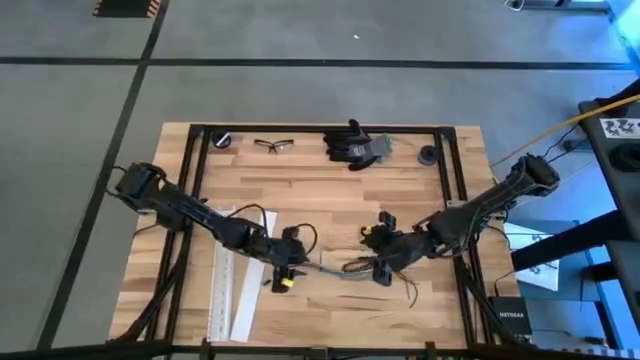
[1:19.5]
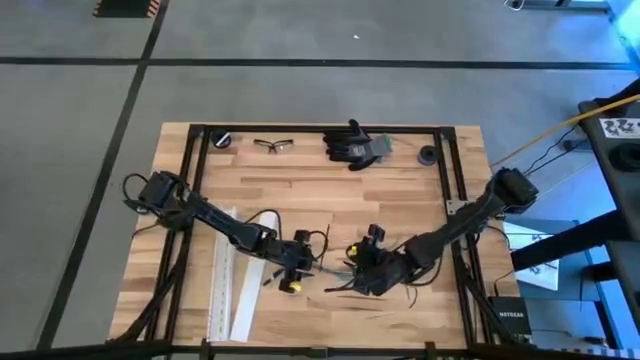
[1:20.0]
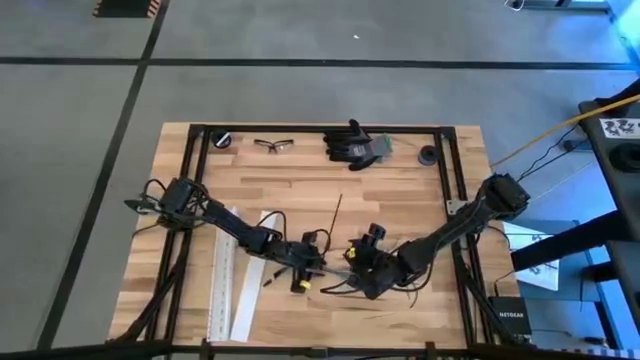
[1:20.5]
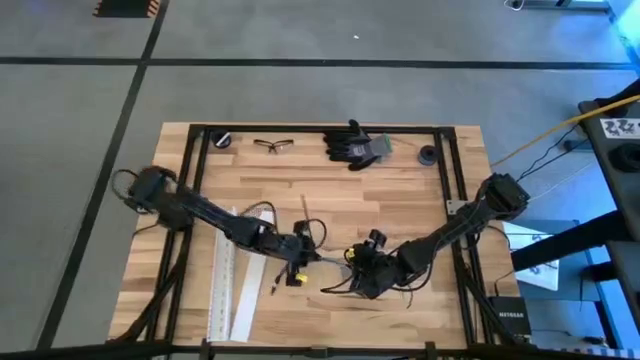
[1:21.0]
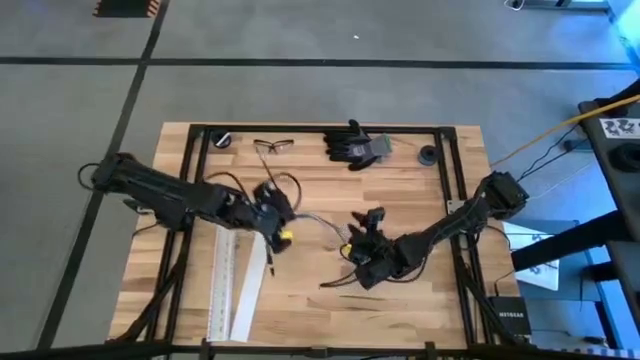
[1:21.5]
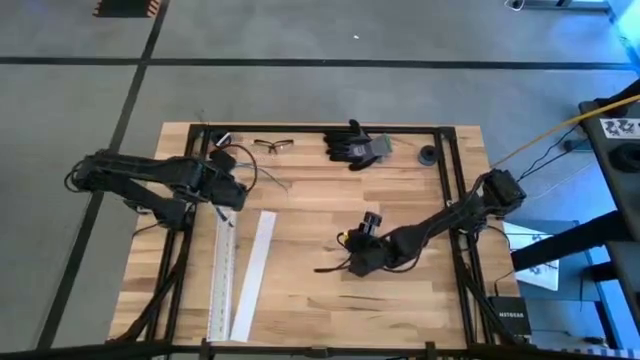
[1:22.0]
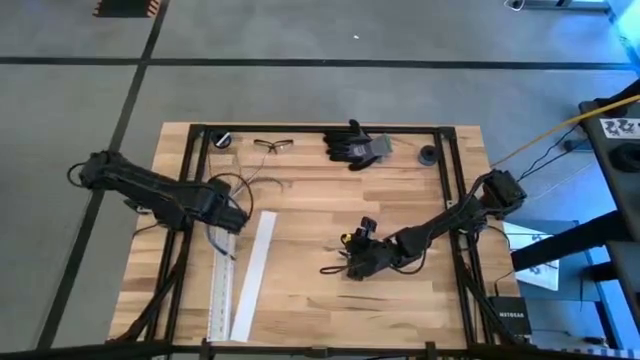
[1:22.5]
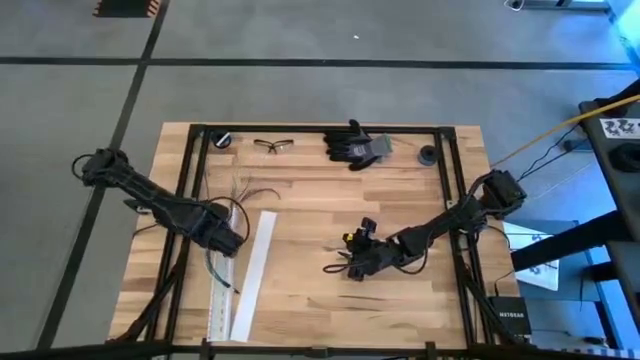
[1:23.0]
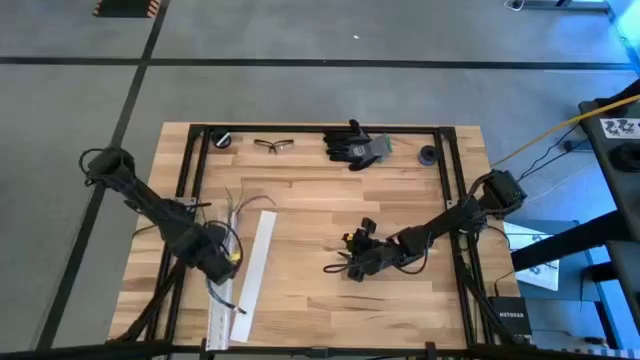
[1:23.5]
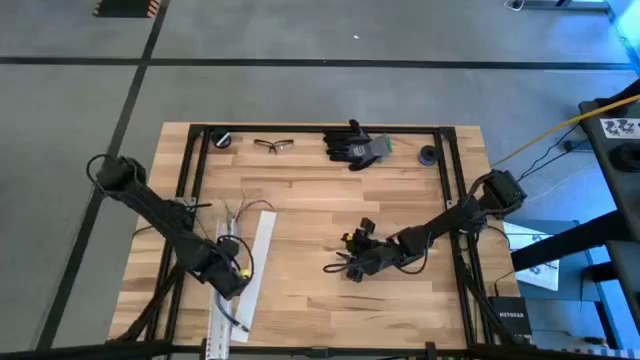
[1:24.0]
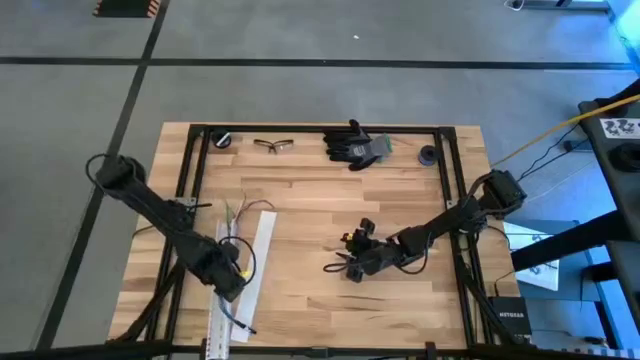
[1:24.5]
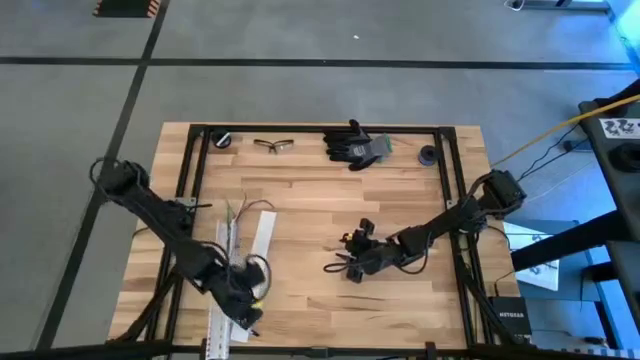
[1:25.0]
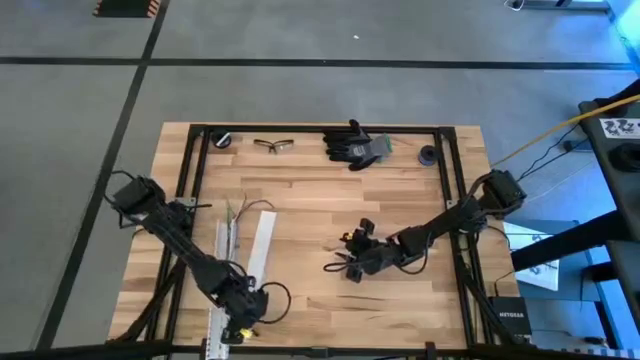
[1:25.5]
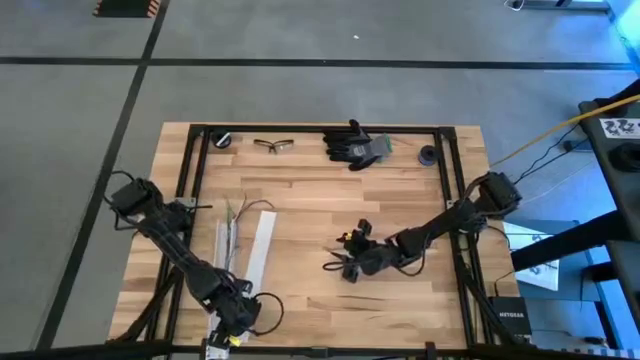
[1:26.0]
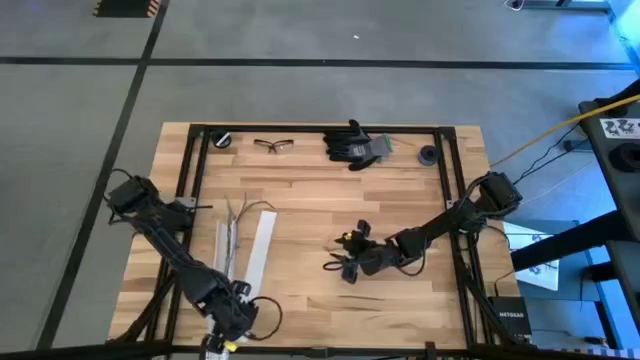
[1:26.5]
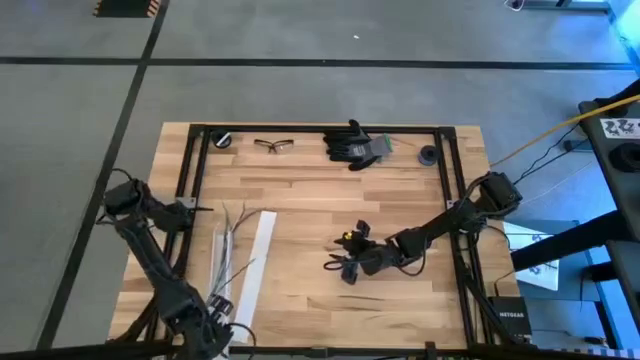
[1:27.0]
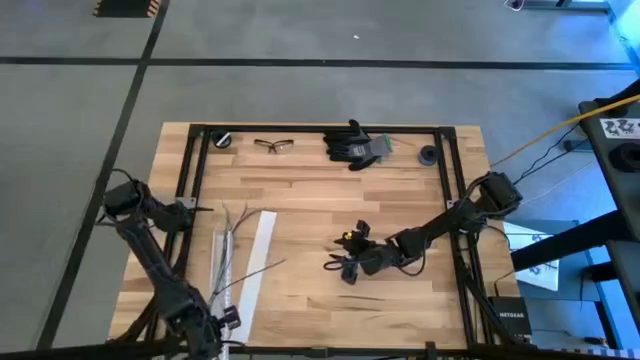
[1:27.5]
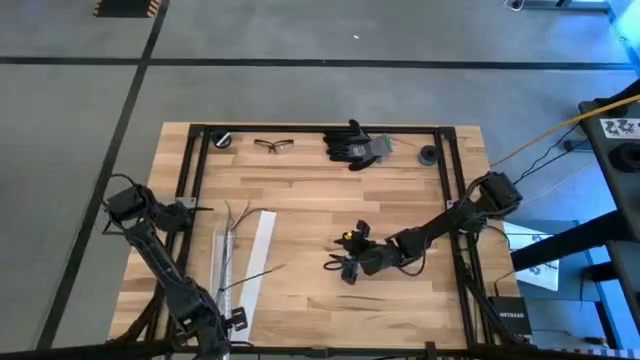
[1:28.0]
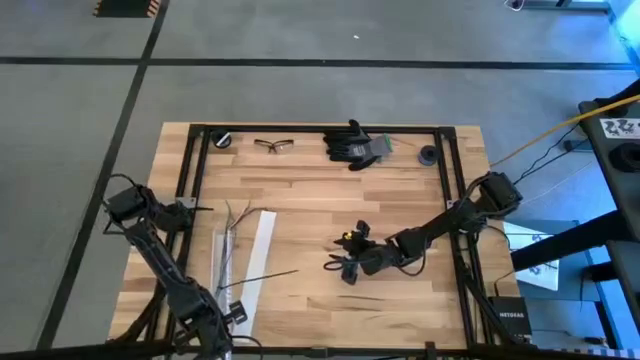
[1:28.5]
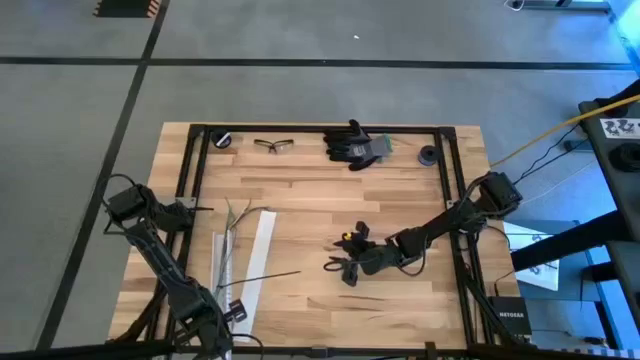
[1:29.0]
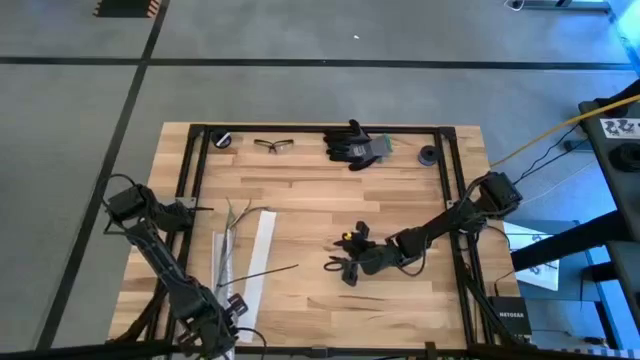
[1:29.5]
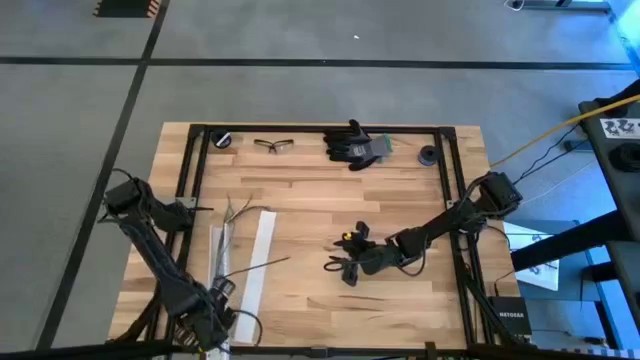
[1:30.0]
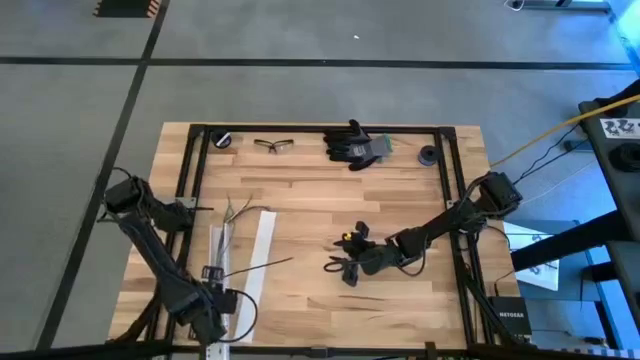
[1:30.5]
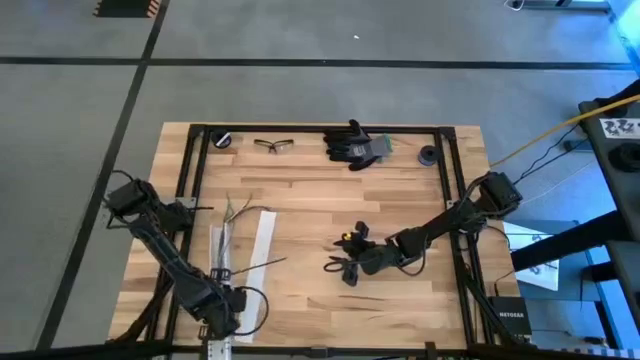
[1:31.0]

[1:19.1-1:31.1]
Task: Ziptie cables
Put the ziptied cables into the white cable duct

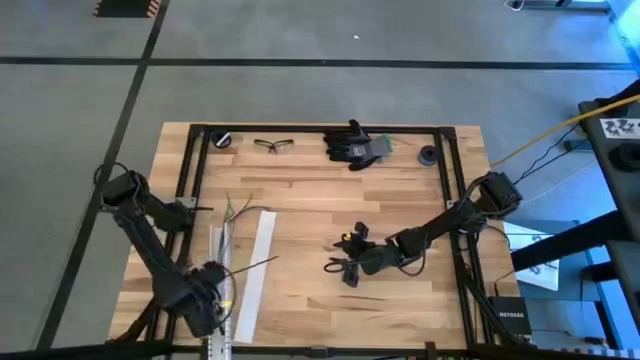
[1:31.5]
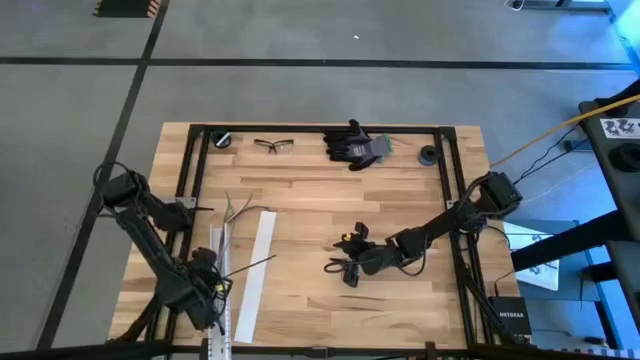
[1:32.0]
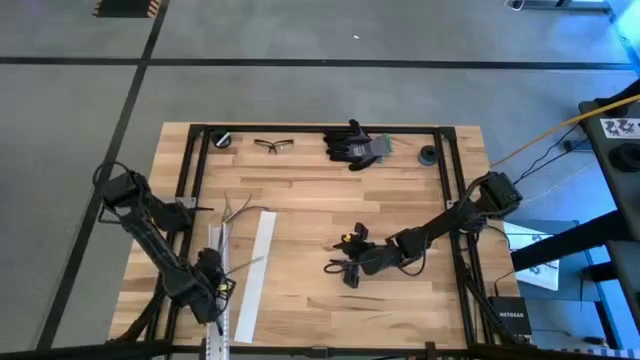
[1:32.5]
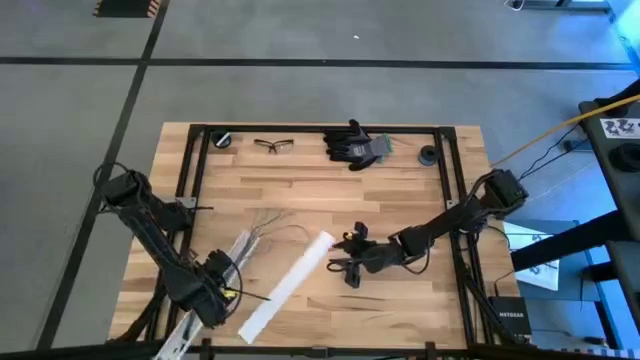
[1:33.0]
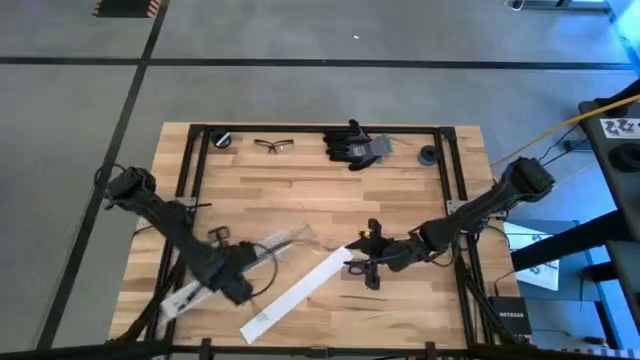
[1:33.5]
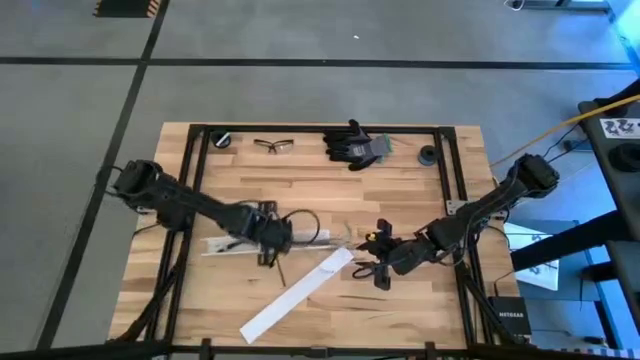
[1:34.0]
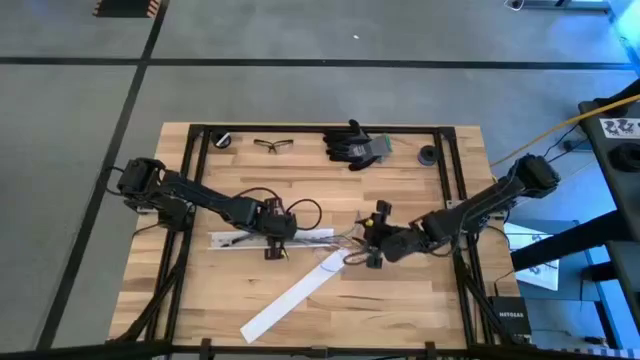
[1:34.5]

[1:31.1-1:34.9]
Move the white cable duct to the center of the table
